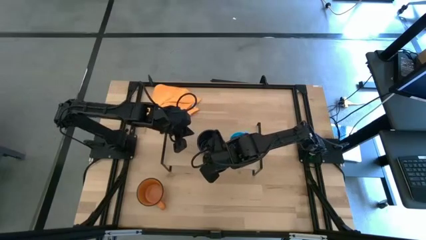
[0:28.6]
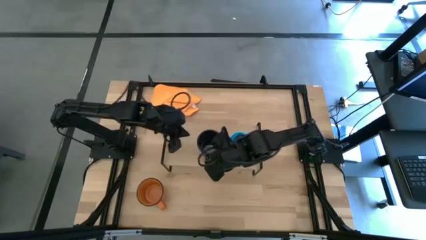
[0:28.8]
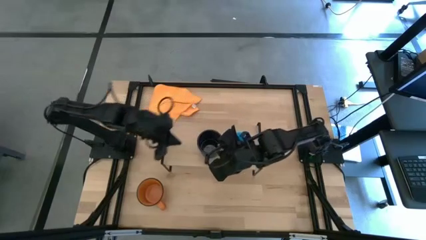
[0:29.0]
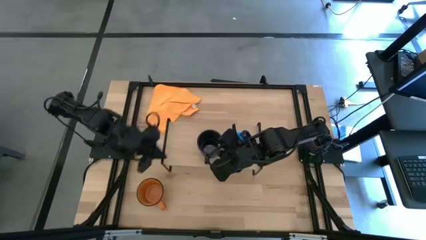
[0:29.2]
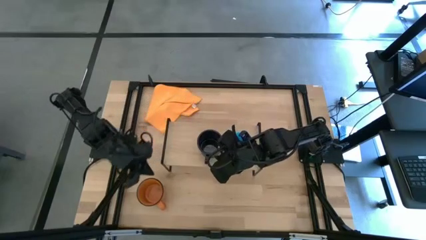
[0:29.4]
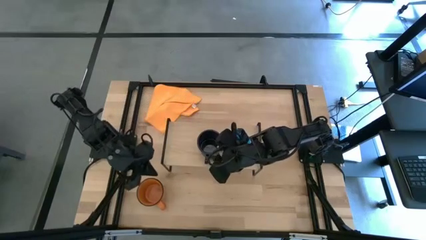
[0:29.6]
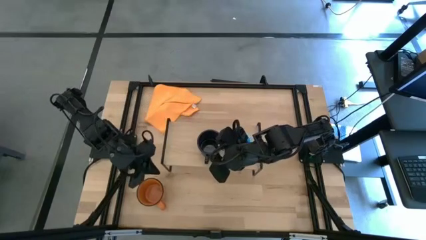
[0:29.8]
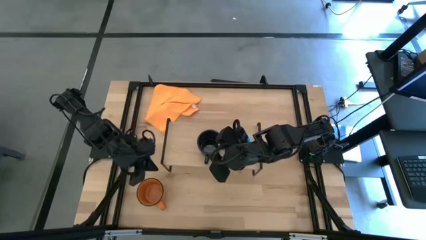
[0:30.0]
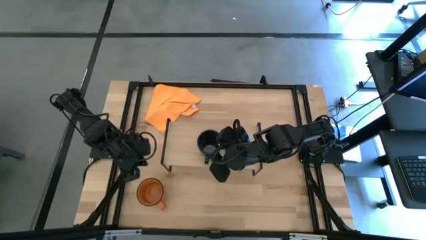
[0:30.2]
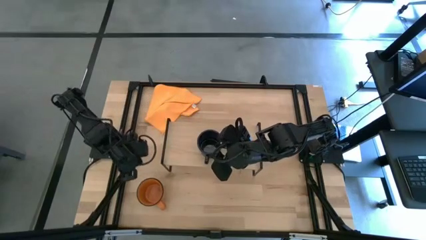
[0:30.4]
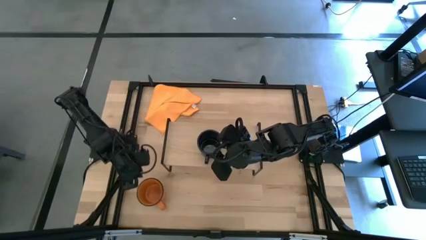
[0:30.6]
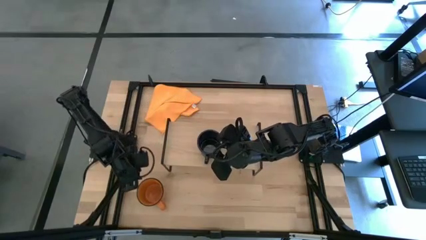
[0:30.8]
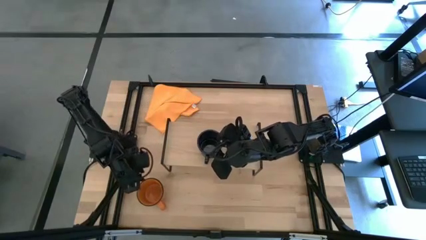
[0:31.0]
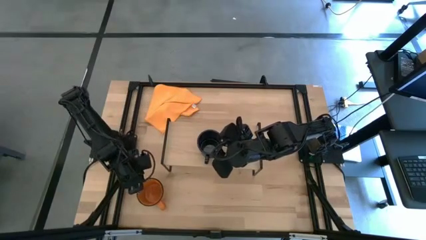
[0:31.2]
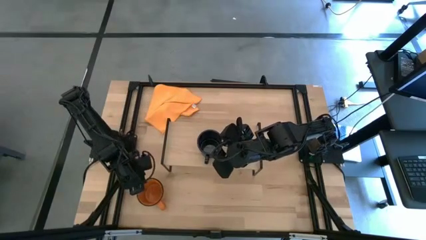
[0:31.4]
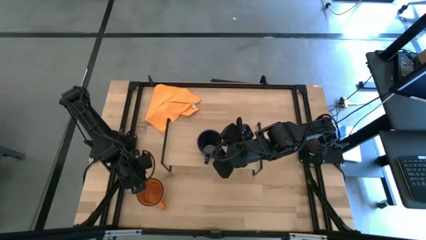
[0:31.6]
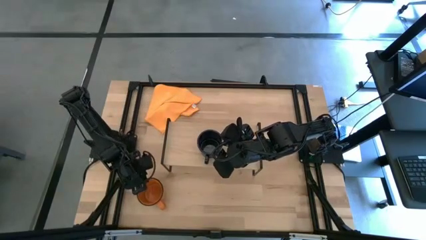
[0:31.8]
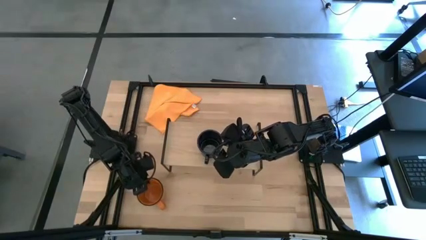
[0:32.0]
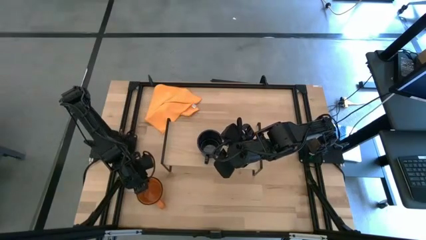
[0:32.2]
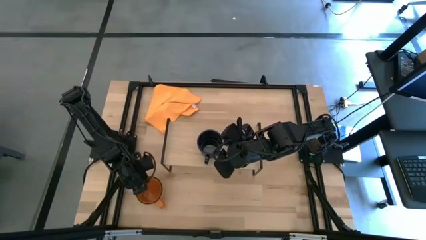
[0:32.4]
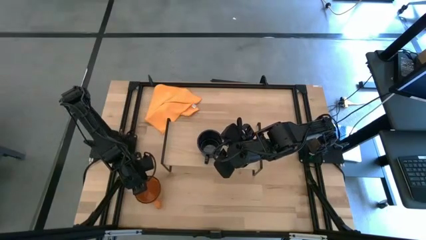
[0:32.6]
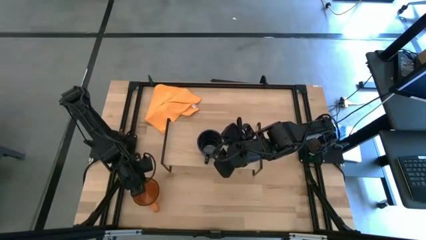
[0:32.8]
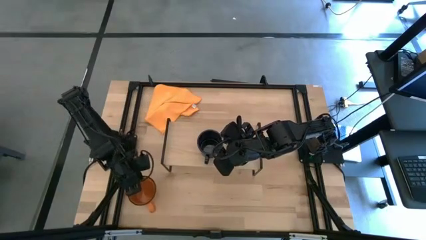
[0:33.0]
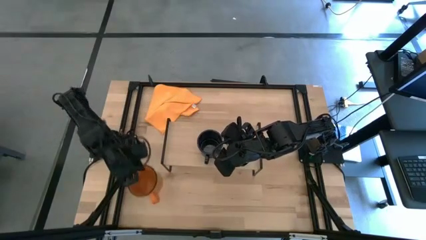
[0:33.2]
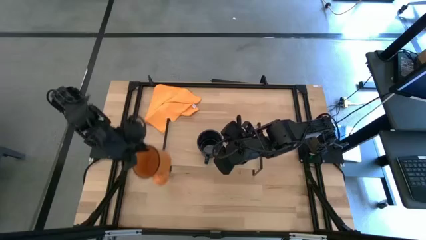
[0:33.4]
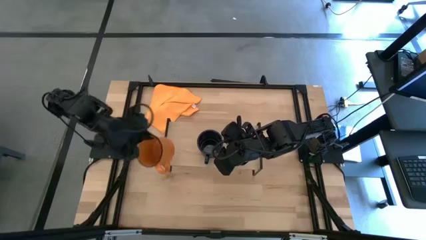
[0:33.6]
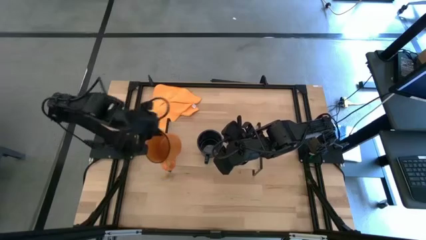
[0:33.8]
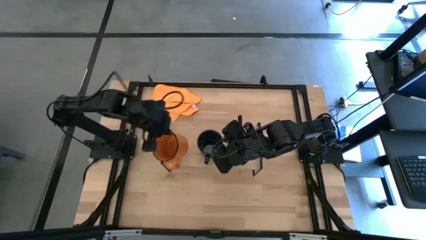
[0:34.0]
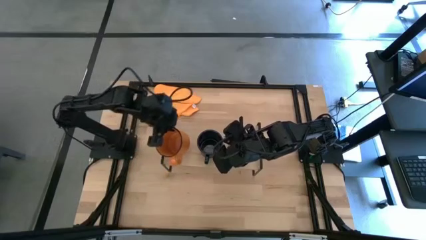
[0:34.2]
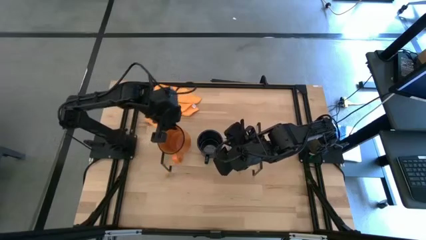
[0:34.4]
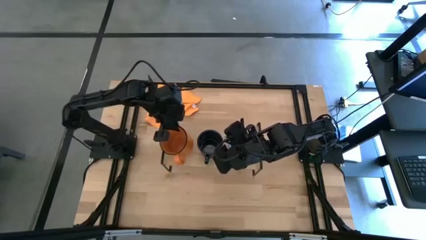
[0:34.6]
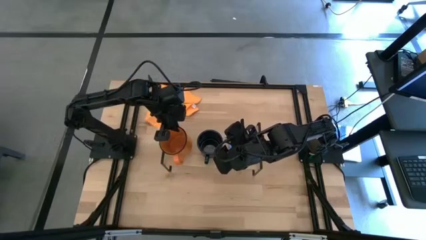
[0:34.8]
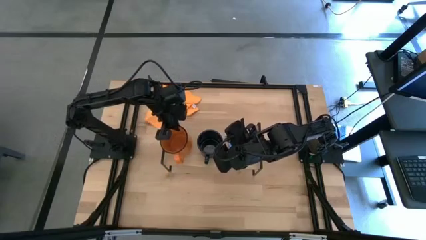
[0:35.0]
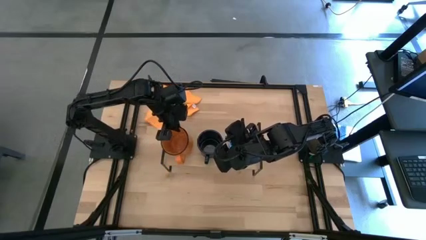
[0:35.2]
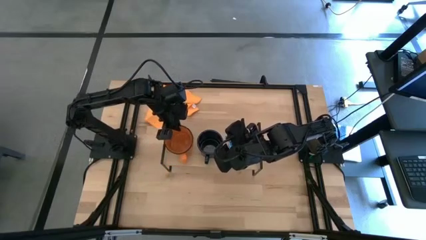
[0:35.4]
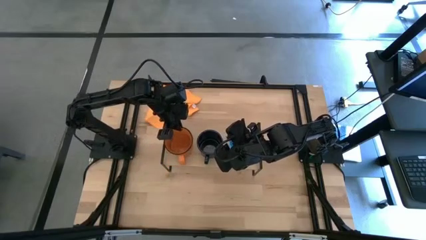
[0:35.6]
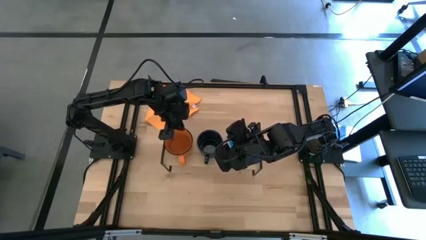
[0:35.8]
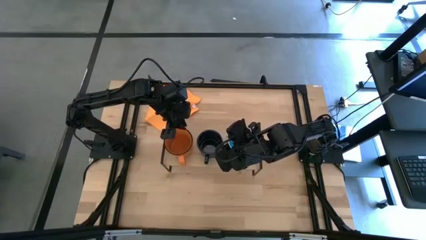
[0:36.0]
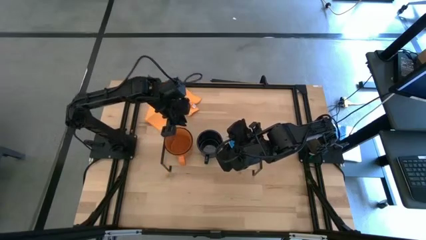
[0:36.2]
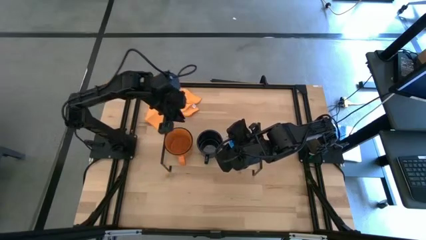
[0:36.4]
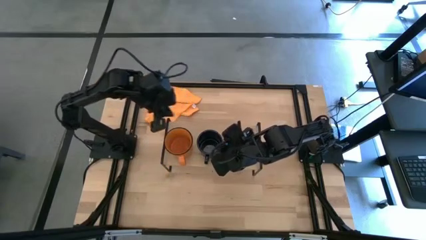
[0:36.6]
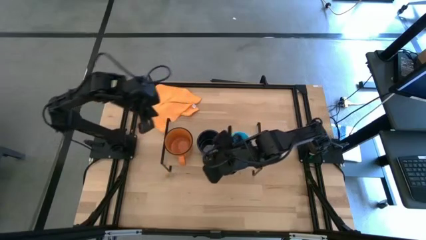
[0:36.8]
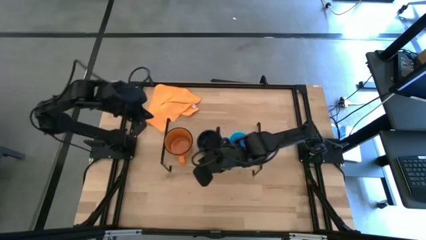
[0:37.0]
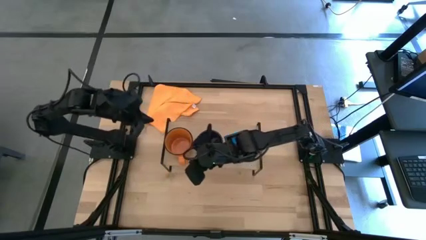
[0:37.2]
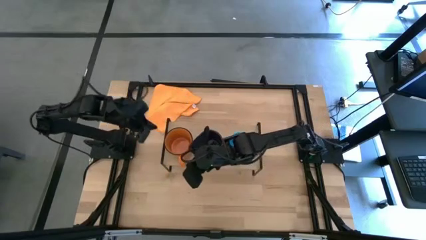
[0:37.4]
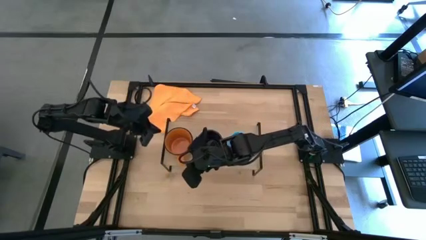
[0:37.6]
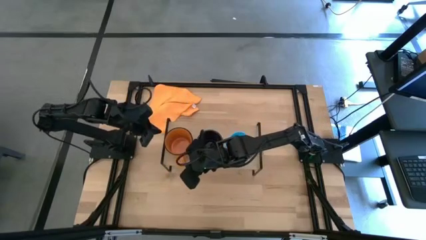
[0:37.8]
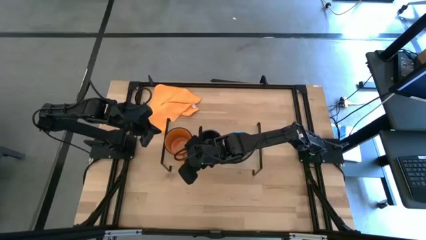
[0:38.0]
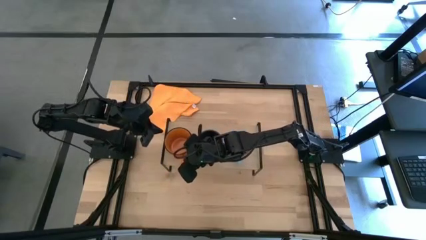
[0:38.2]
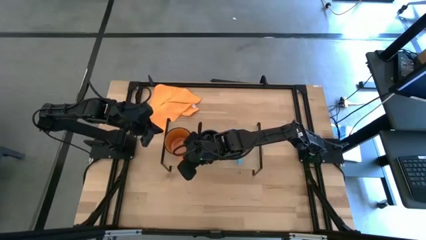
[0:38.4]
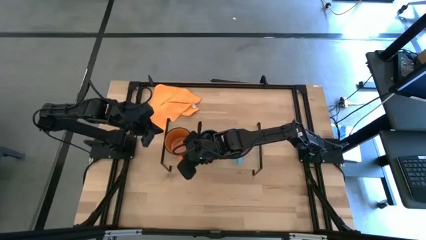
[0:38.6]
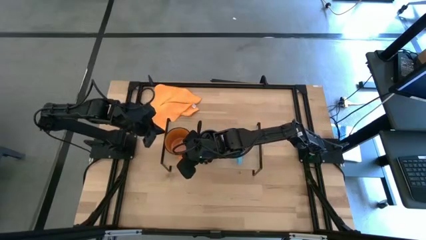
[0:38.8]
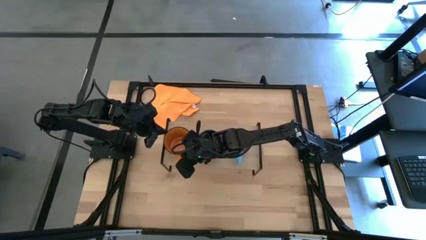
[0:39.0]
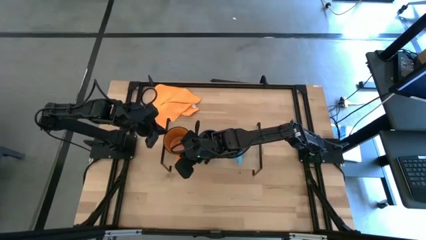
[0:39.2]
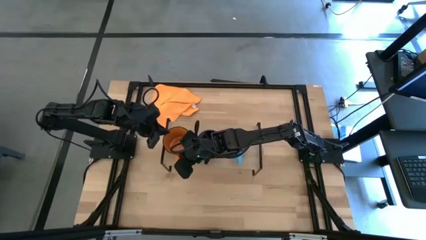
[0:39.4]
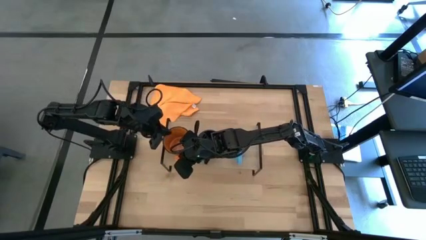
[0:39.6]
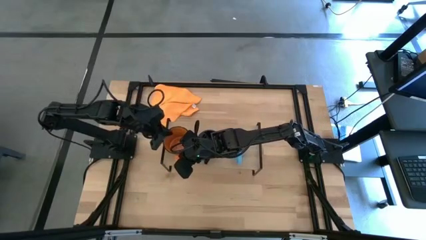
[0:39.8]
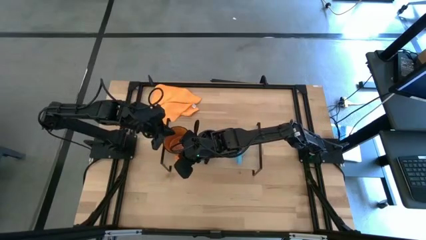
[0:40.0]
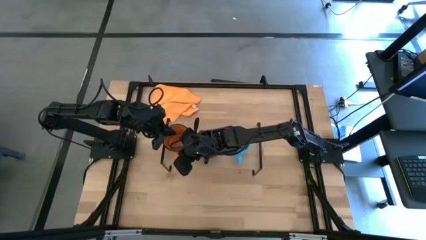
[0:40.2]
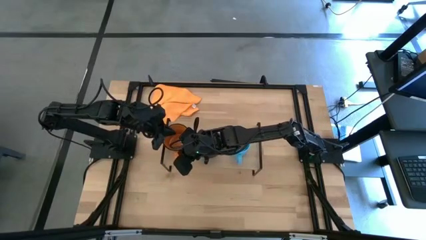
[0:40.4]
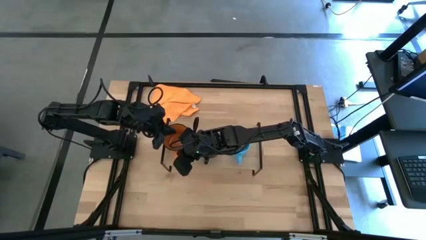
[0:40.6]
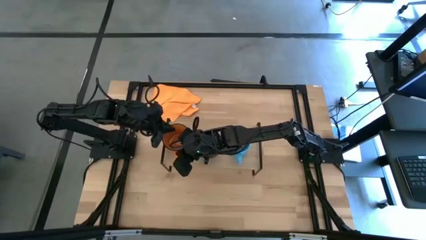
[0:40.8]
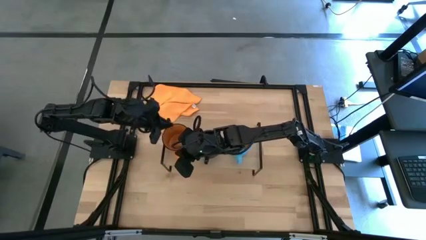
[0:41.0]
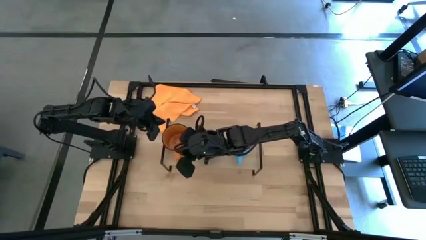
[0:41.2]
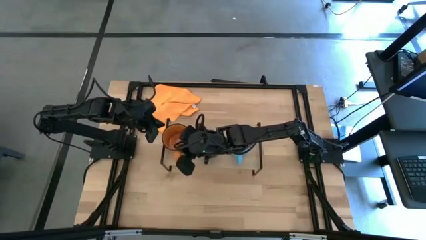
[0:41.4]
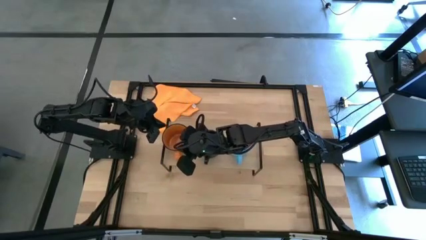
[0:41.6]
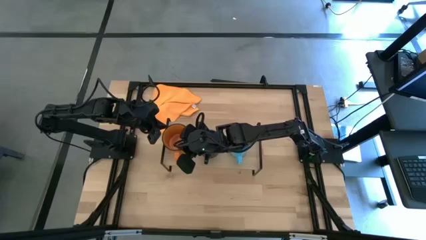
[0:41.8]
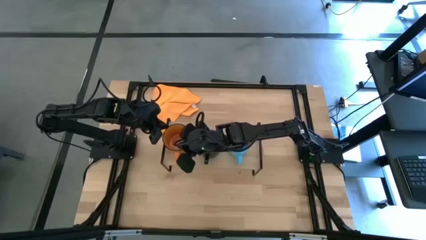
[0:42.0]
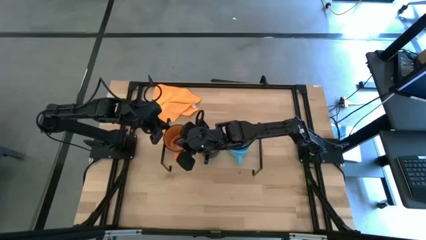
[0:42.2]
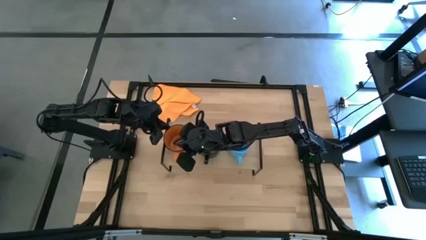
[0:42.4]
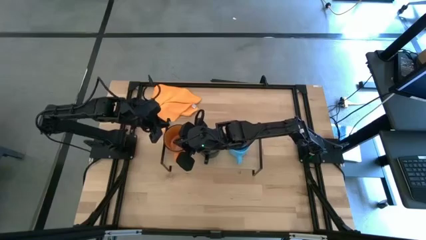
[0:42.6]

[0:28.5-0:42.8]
Task: Stack small to large cups/mugs on shelf
Put the orange cup on the shelf
